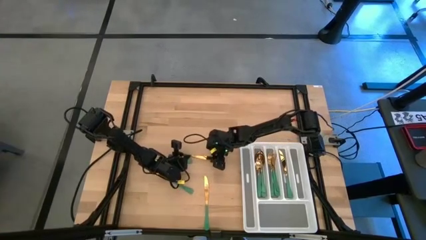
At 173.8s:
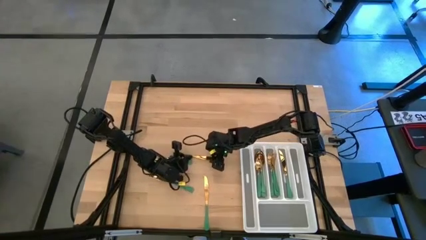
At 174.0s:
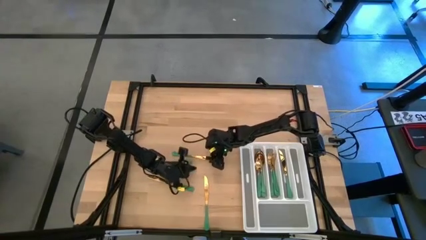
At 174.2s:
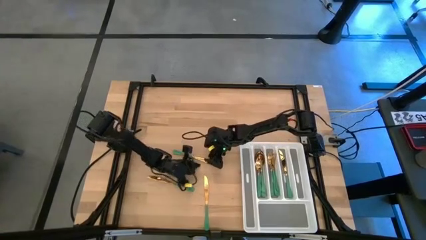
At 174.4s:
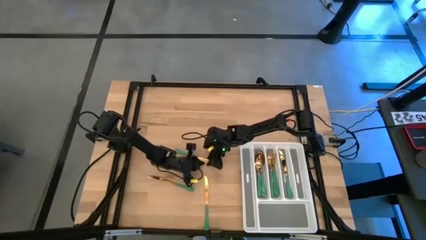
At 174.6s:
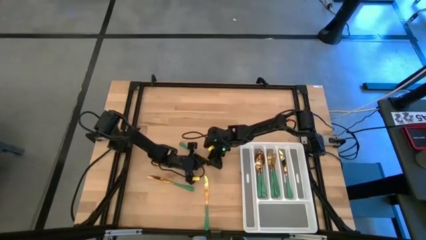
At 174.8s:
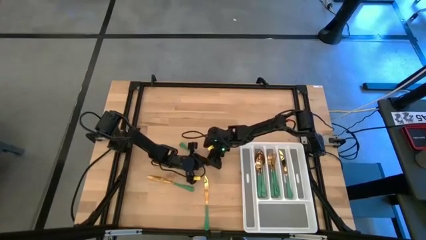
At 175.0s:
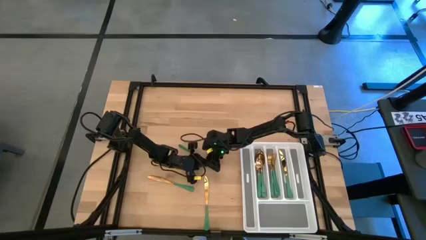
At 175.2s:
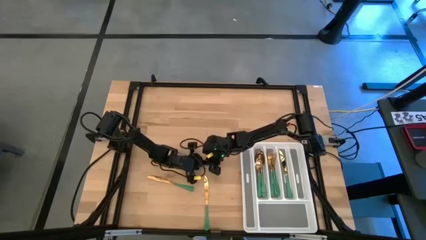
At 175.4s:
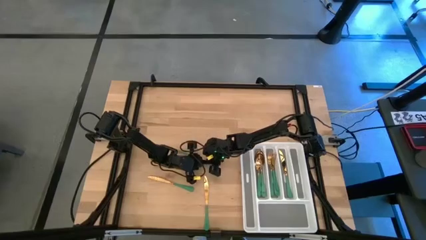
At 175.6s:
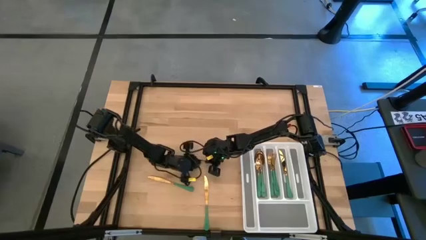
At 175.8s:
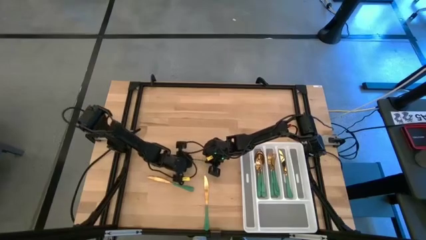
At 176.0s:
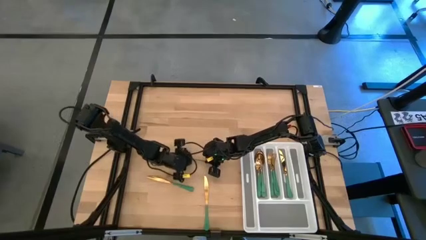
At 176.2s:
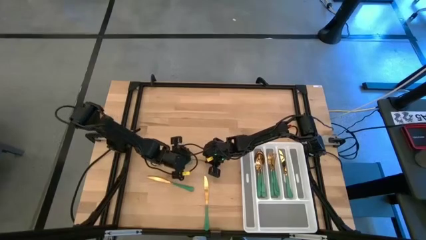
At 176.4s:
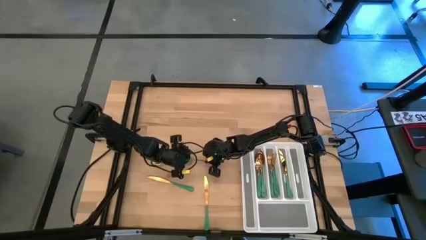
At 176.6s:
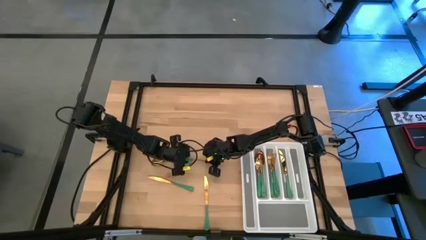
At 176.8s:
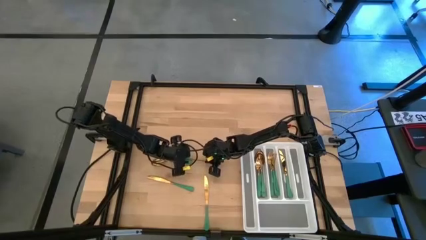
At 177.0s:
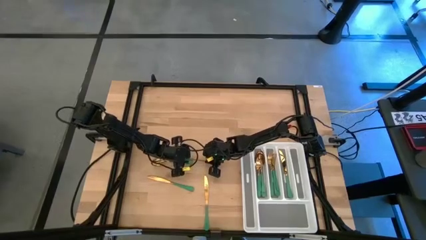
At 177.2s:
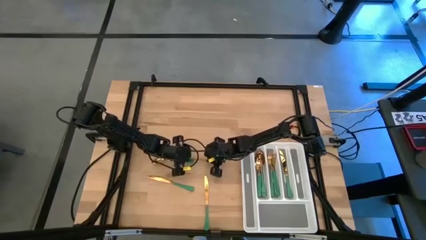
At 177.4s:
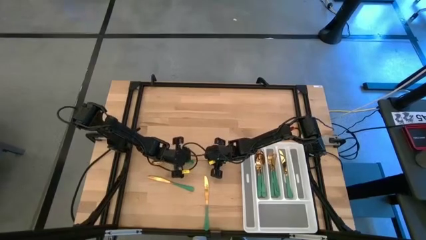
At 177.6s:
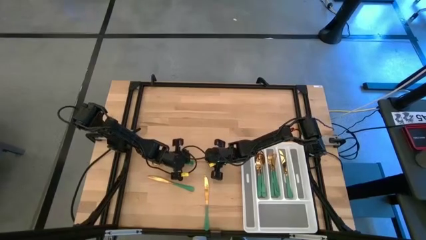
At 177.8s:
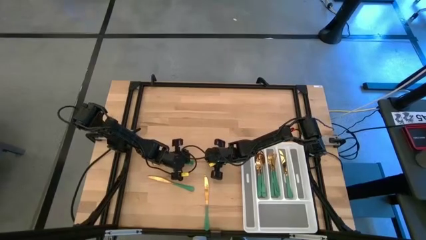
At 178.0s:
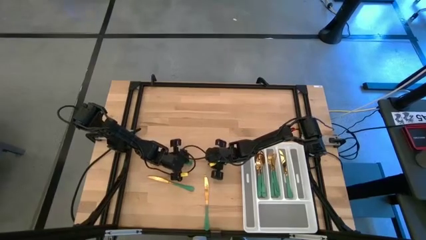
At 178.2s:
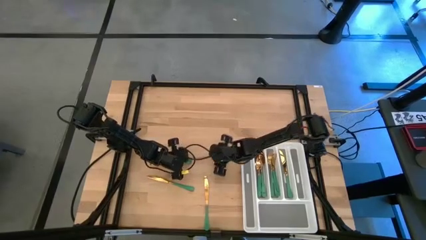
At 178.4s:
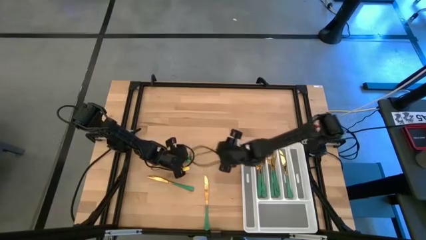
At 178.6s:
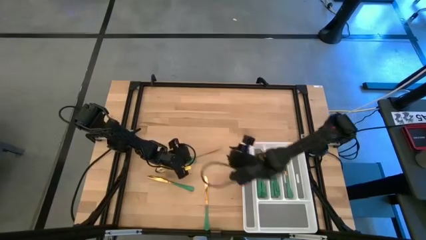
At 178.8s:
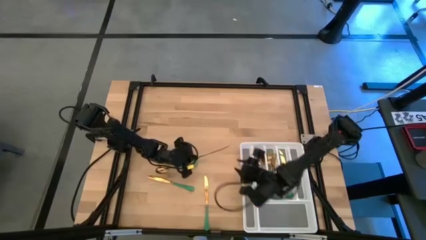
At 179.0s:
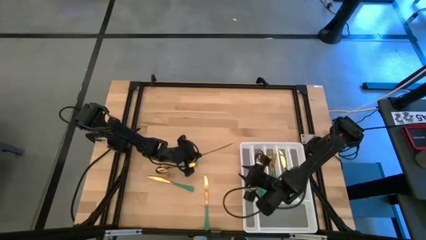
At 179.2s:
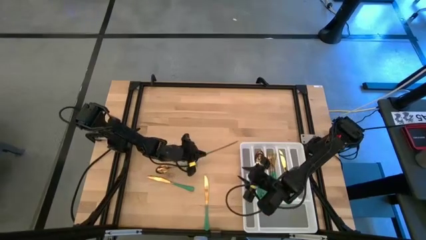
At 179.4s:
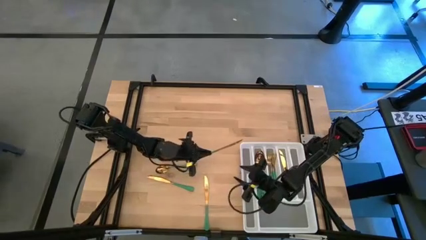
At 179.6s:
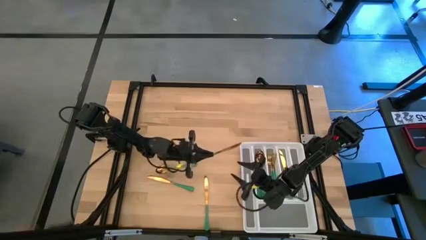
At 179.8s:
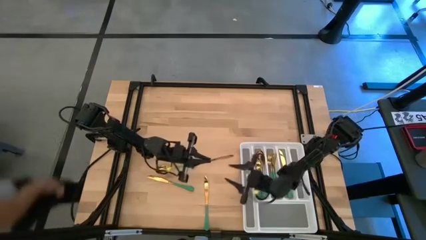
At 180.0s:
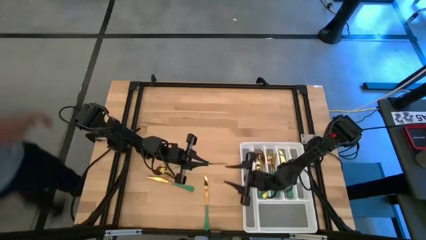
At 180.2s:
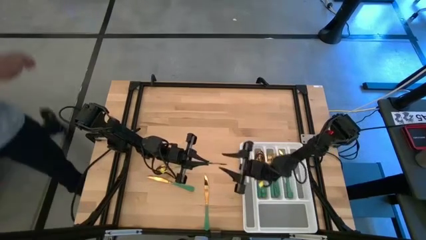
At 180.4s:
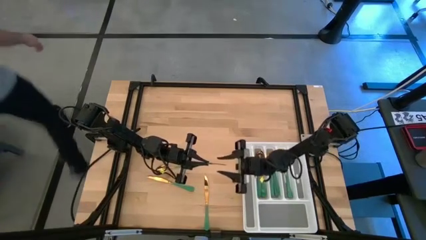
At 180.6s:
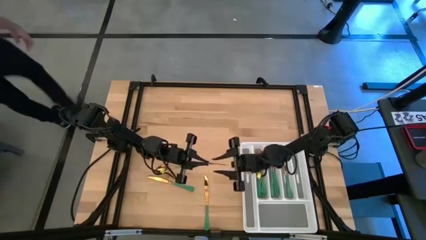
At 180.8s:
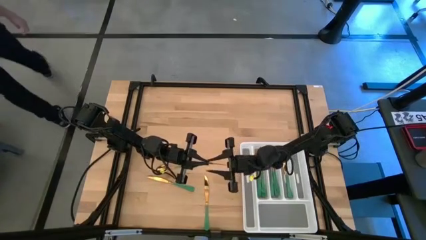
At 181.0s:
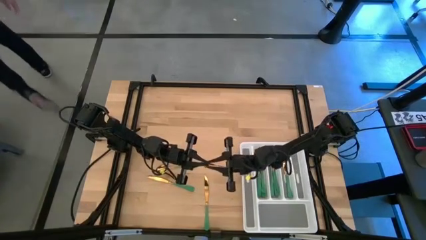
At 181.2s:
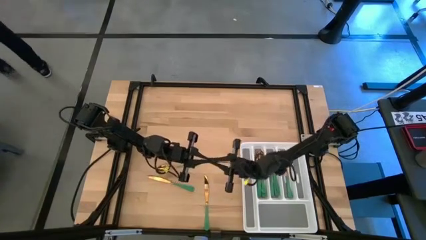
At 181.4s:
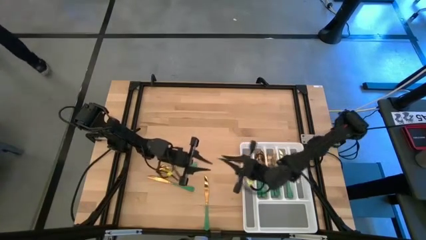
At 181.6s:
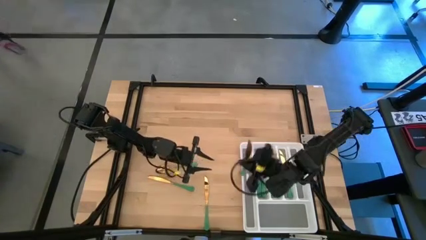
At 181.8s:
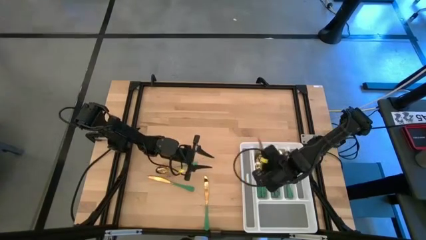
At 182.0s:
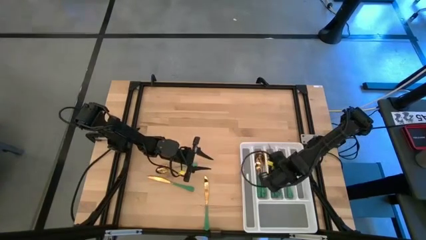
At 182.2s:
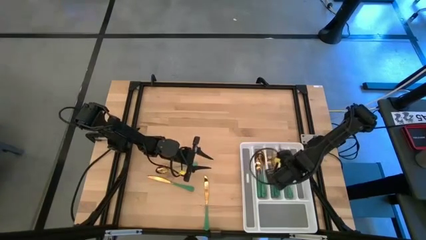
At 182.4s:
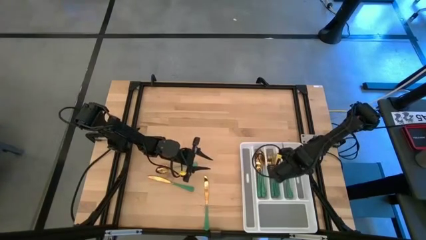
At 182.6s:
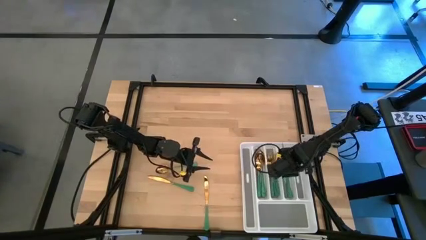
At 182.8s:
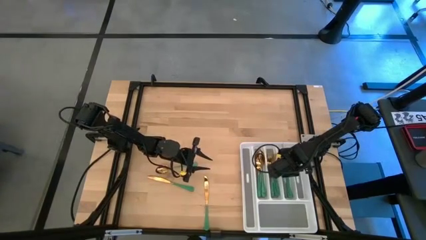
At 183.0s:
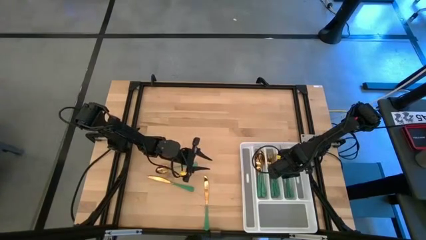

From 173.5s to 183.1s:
Task: Sort silverware
Put the top center green knife into the silverware rack

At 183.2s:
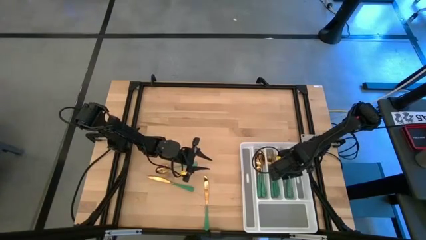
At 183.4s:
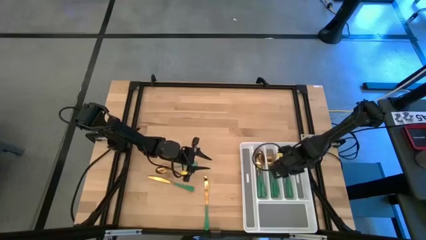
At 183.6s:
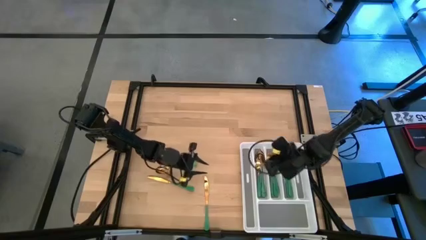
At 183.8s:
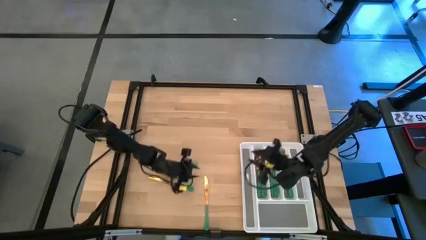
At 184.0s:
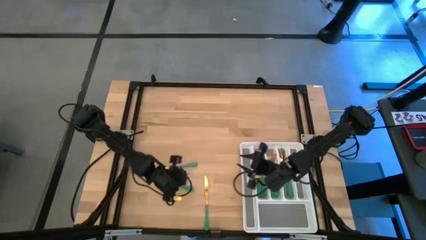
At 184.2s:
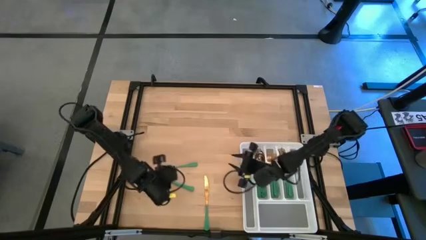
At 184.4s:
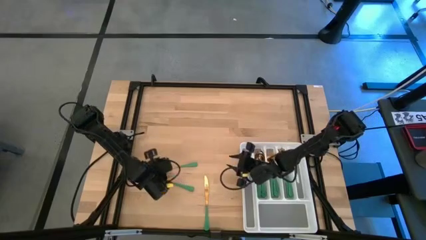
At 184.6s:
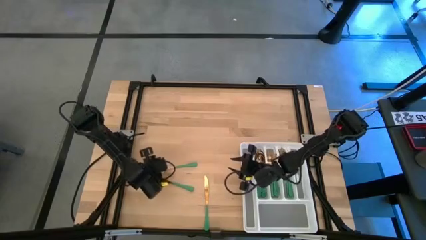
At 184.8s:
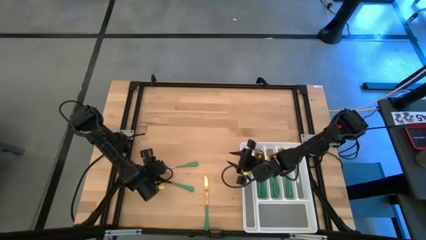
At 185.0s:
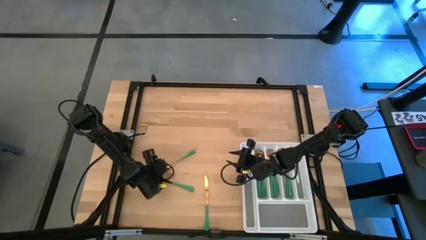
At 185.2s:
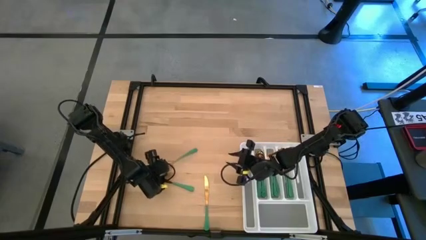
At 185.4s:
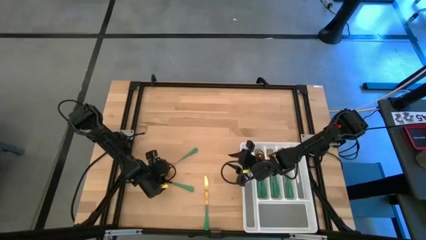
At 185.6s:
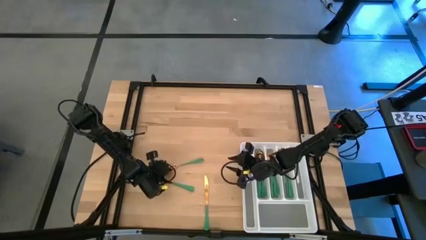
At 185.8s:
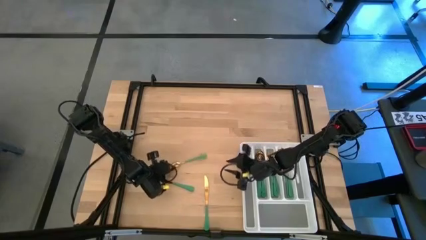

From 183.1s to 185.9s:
Put the spoon into the silverware rack

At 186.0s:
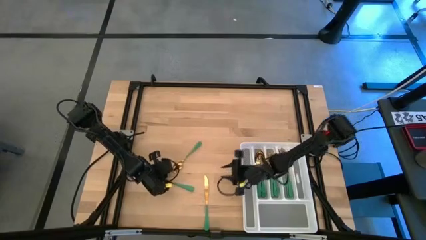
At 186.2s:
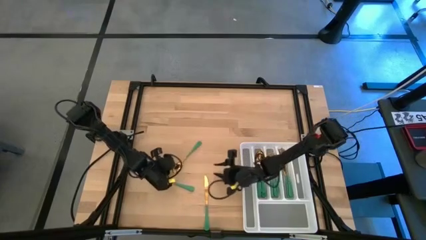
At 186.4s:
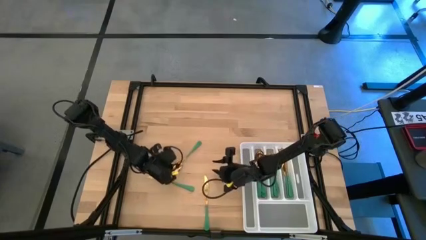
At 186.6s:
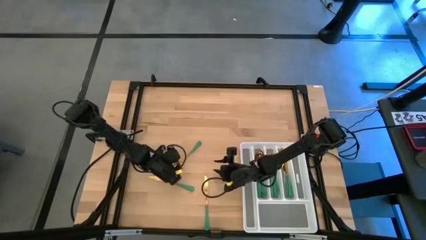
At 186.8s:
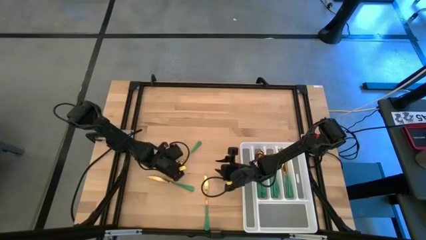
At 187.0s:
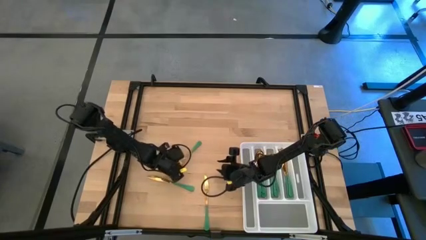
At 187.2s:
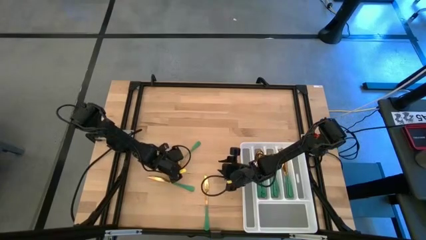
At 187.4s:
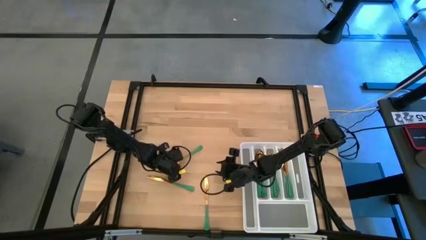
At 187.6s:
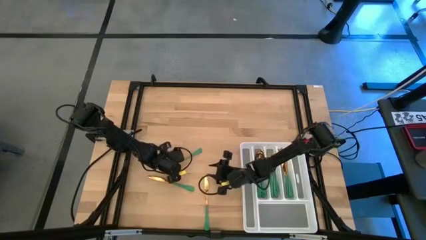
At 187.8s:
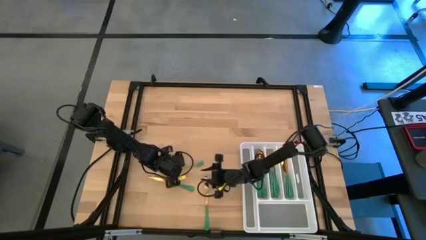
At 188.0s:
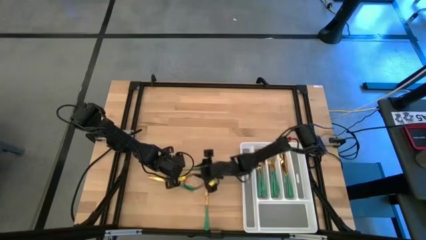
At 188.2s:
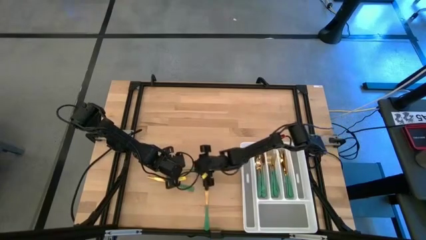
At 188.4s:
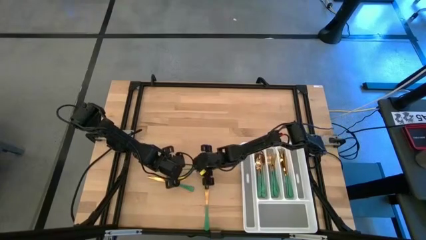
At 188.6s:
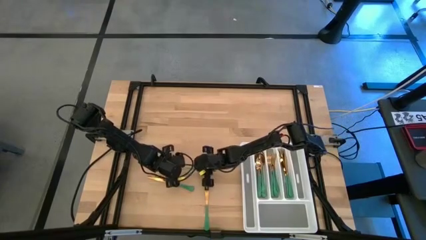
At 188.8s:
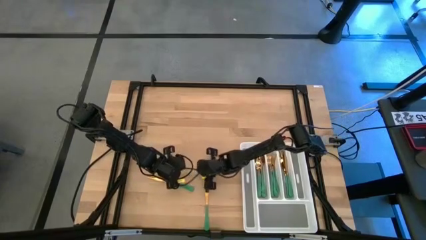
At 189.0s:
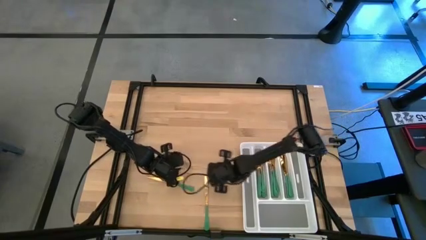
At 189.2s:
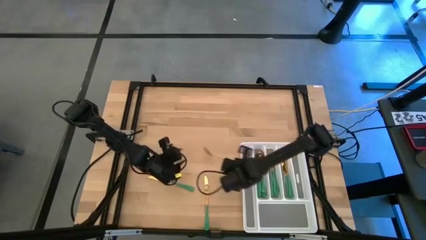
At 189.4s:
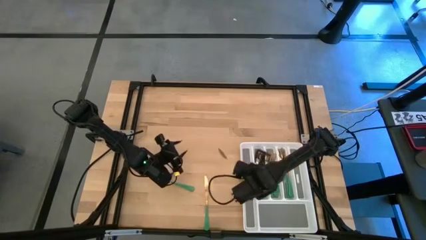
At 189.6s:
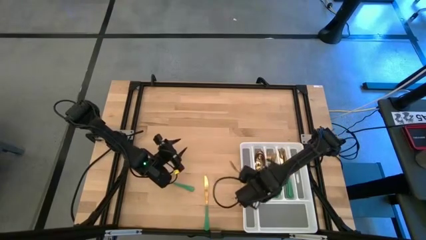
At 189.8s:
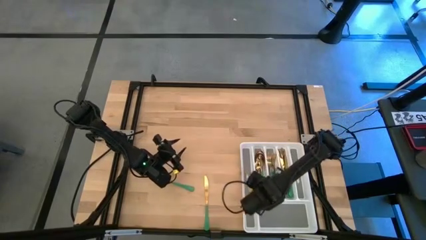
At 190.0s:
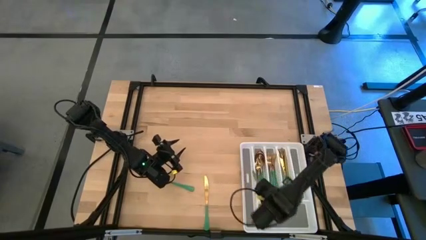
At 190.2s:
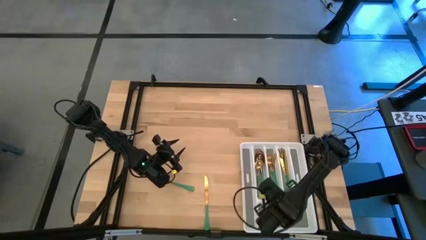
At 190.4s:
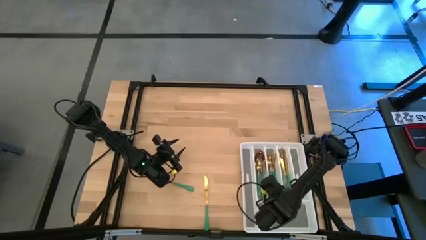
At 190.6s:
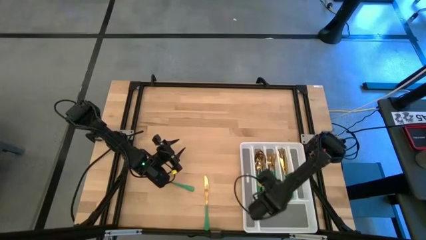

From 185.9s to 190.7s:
Put the green spoon into the silverware rack
